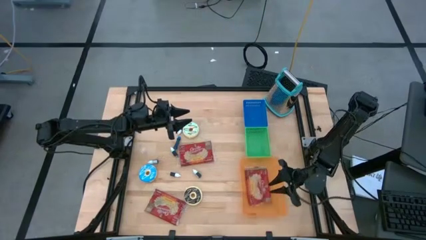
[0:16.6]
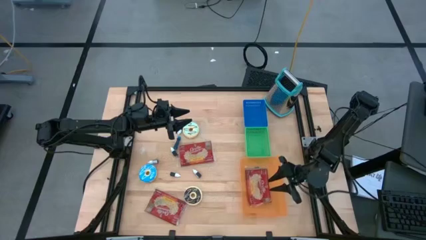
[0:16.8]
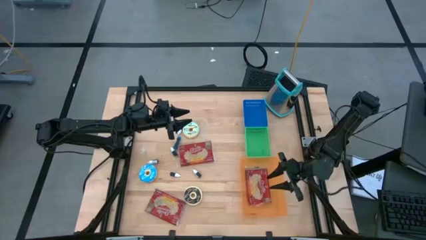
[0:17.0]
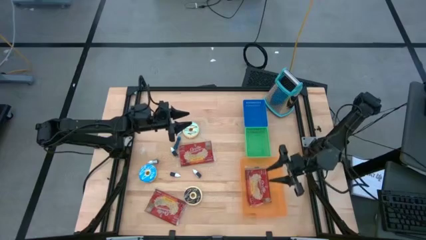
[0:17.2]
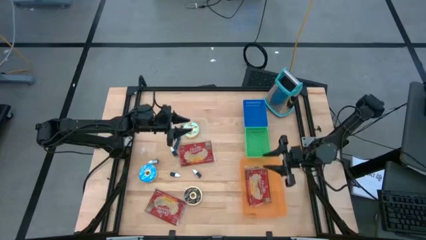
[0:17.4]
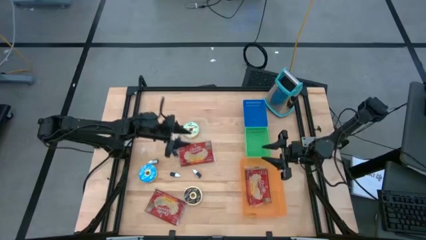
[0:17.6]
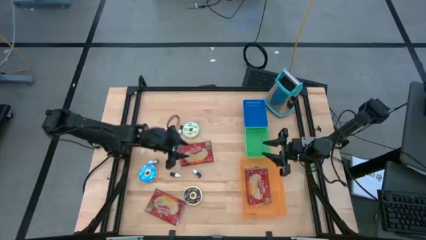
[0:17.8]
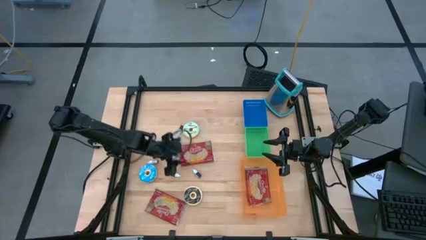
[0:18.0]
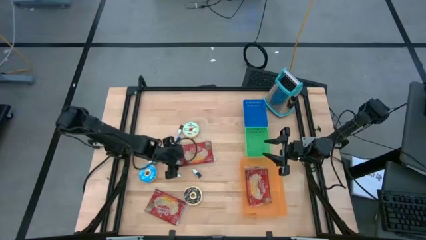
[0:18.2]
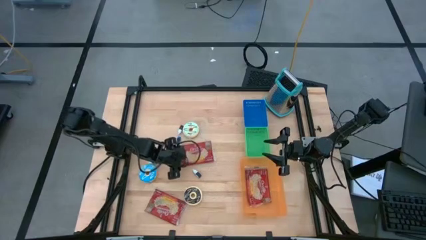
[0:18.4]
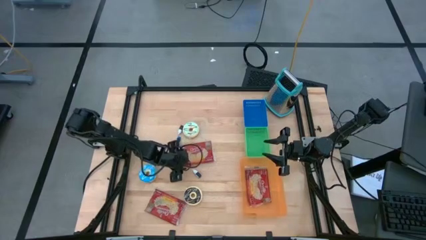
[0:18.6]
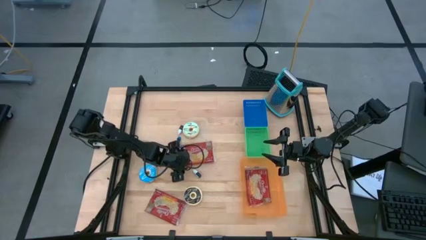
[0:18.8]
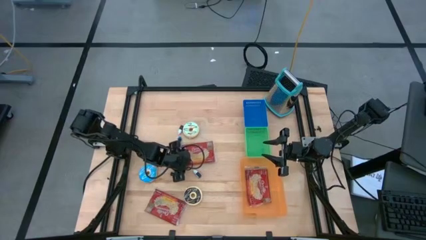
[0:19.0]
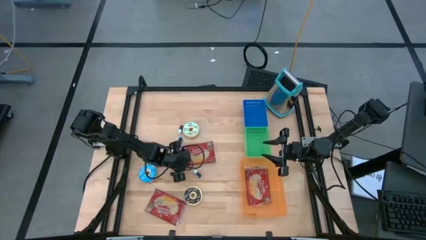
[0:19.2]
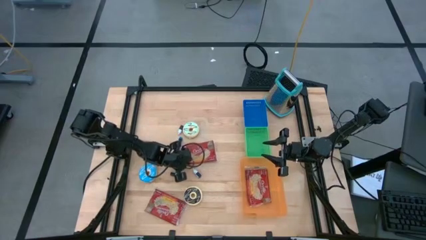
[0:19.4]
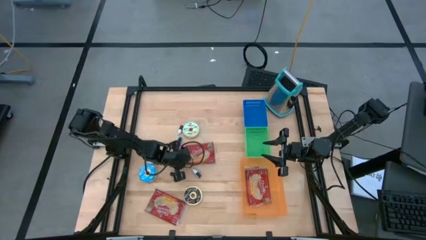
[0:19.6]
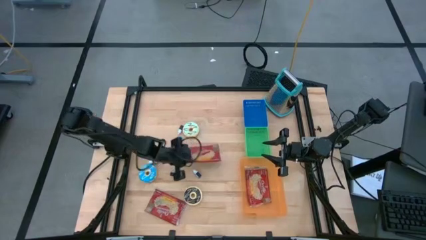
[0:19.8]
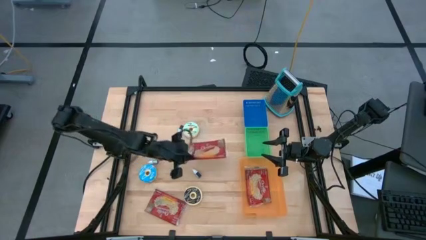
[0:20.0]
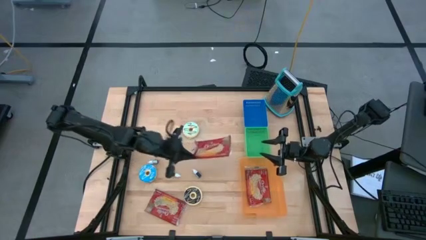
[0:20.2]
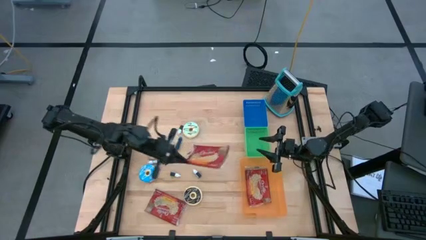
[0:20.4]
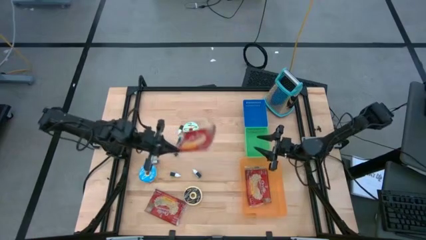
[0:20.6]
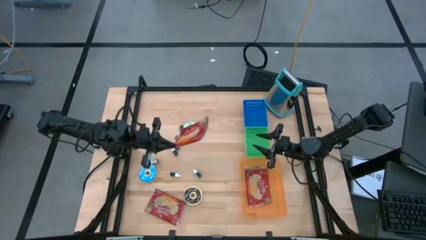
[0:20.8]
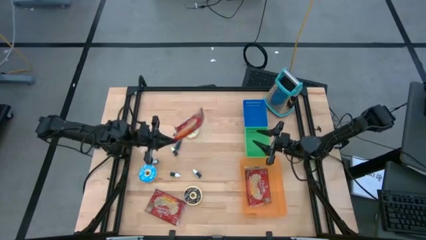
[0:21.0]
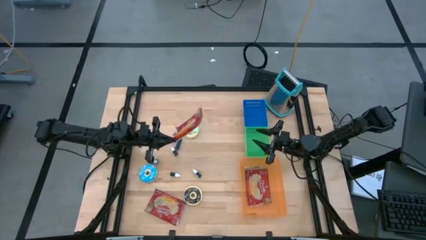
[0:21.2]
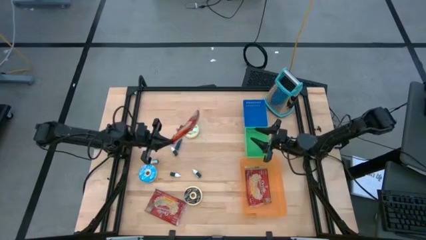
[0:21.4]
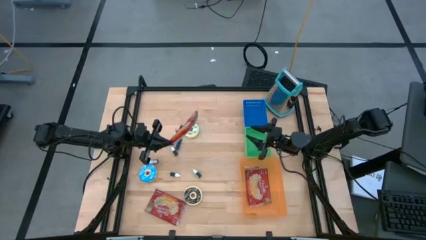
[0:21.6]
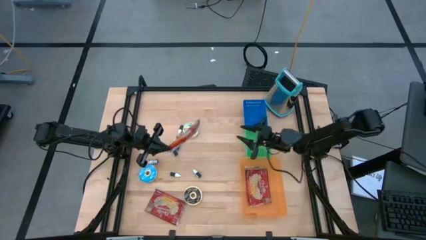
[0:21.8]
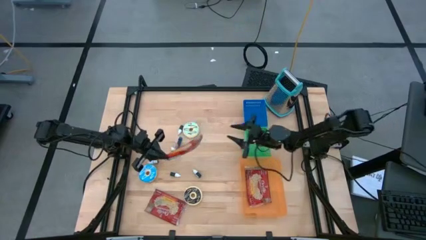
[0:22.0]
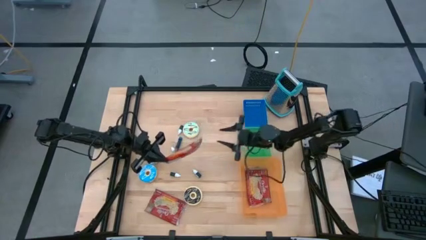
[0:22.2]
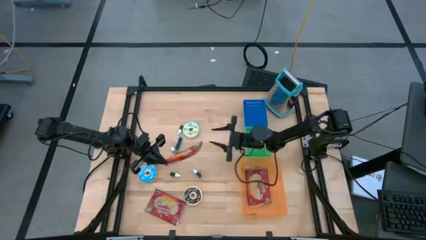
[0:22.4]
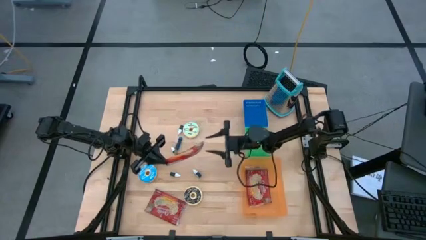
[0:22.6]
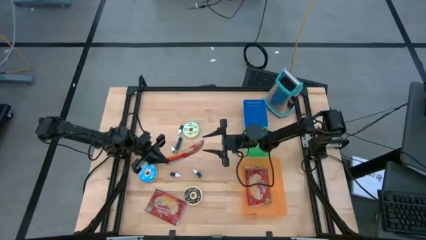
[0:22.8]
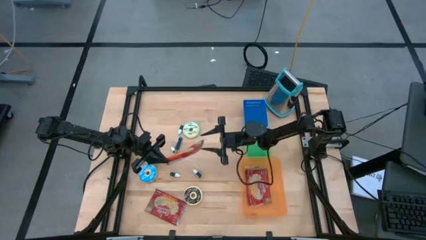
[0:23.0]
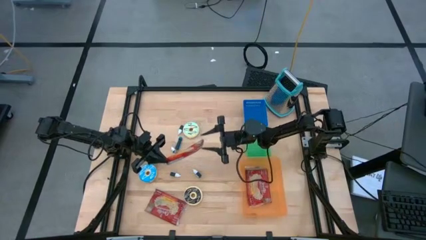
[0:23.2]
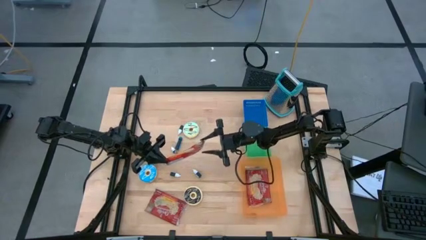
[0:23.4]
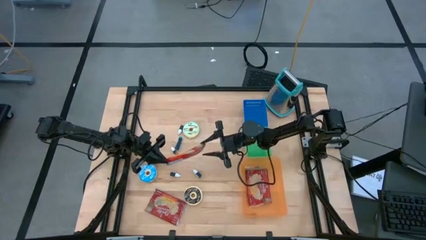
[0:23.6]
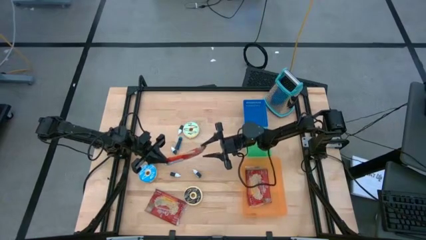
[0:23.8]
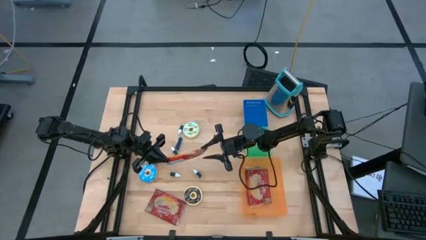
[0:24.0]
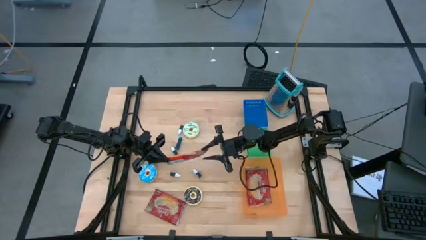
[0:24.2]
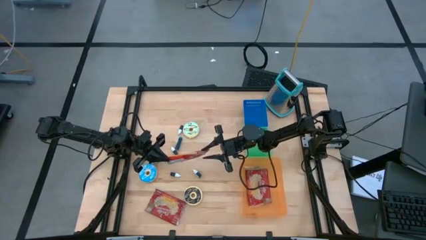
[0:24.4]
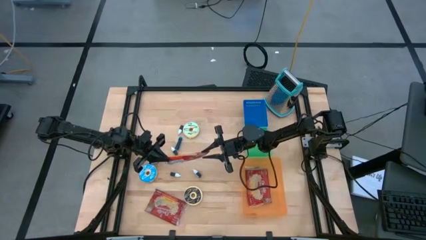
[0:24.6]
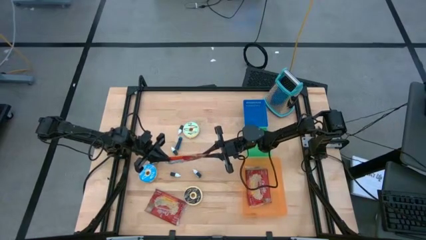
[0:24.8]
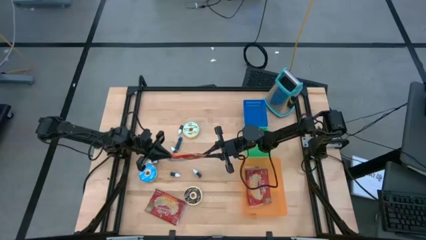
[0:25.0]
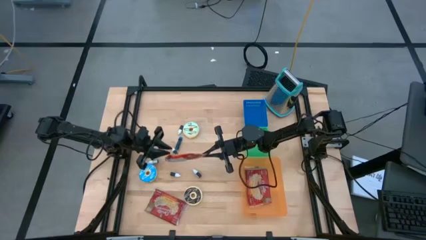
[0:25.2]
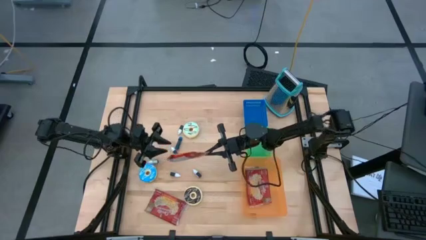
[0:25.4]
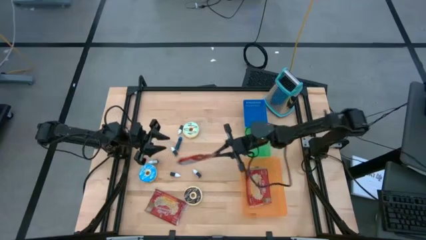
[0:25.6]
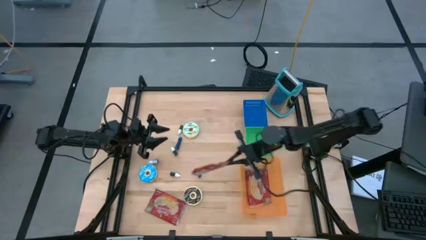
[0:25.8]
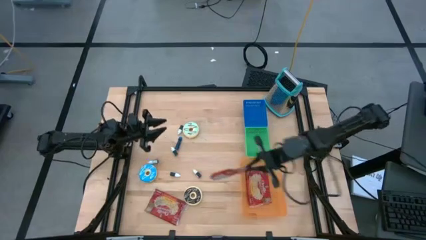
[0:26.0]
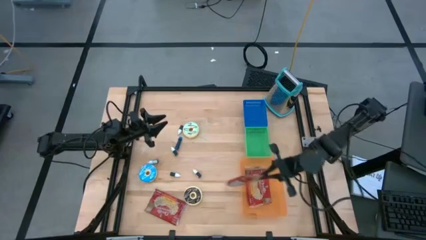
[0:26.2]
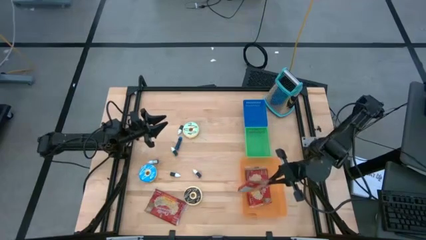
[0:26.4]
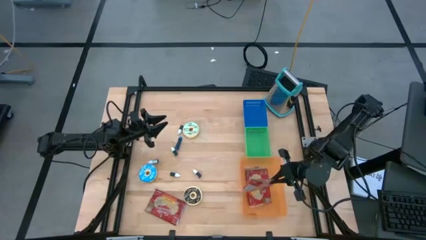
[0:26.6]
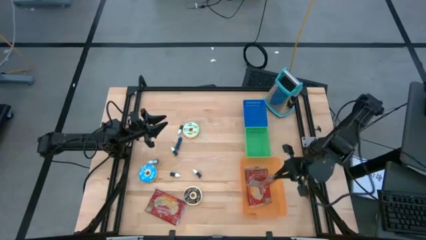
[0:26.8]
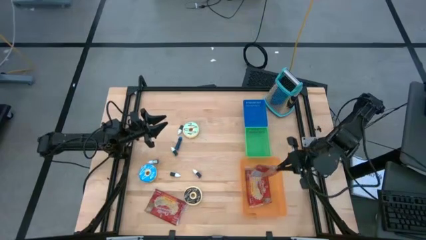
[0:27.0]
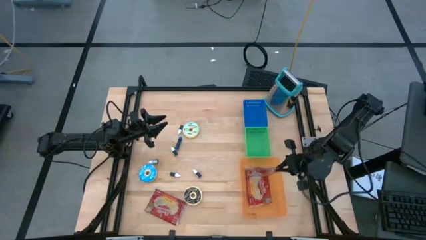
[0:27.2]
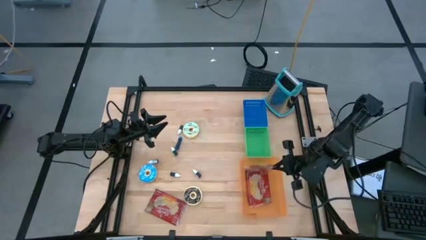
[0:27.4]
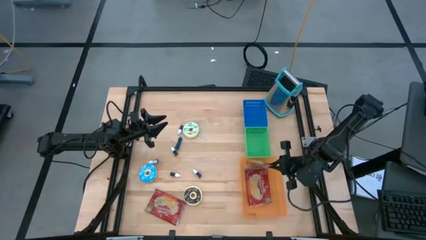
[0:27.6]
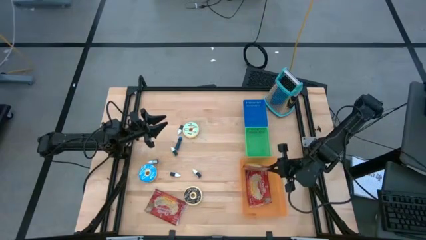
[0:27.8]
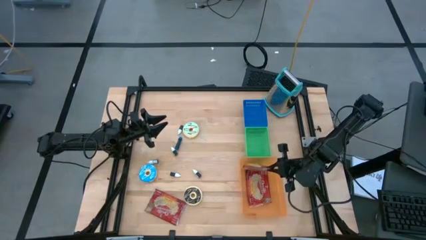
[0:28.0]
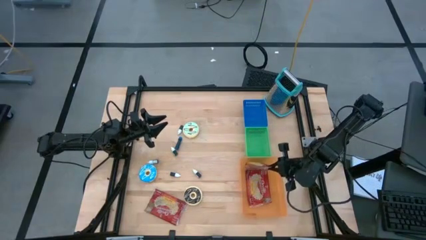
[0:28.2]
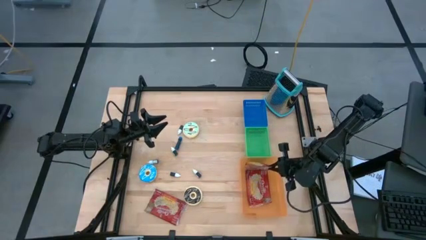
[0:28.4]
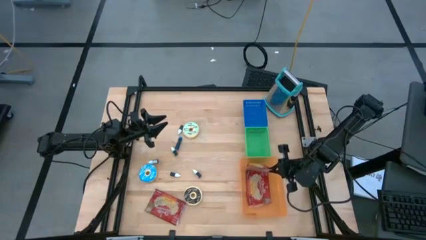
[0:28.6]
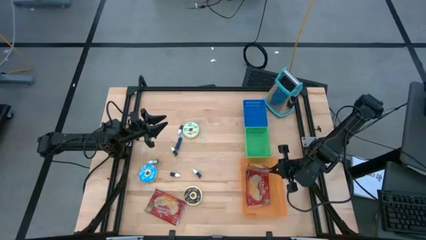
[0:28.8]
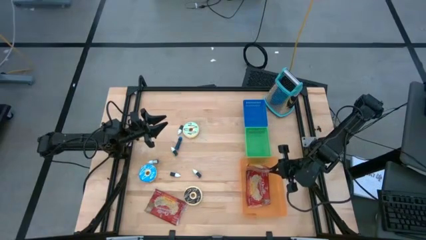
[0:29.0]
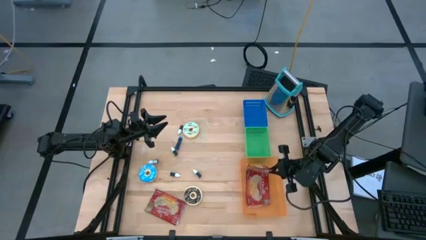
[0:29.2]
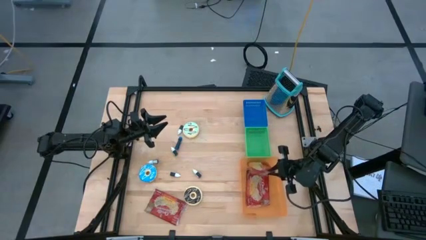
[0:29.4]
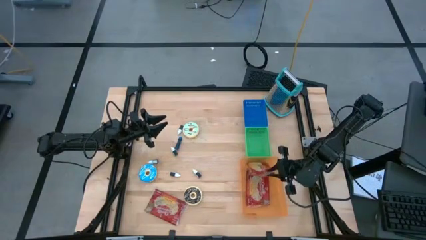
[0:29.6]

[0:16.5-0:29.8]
Put the top red popcorn bag into the orange bin
